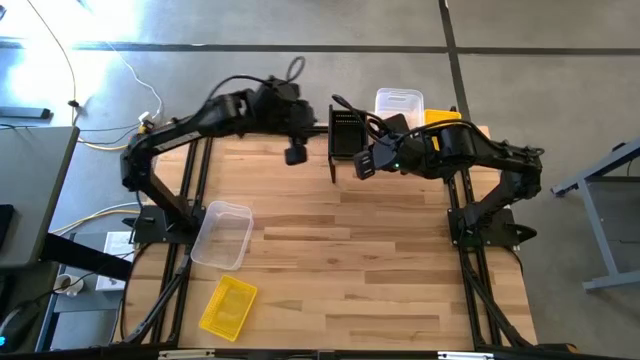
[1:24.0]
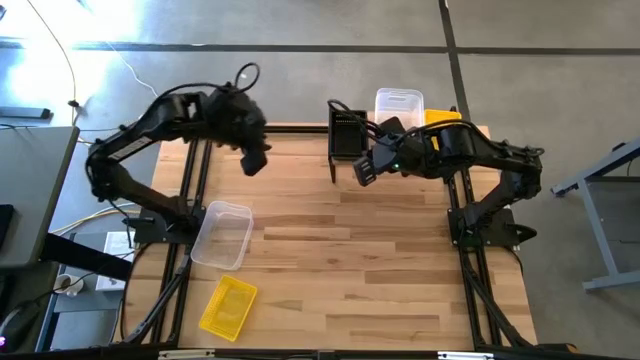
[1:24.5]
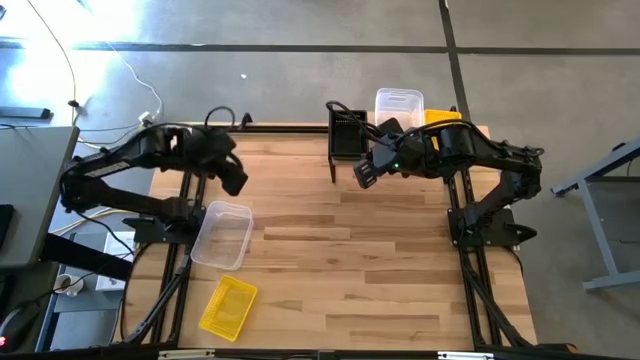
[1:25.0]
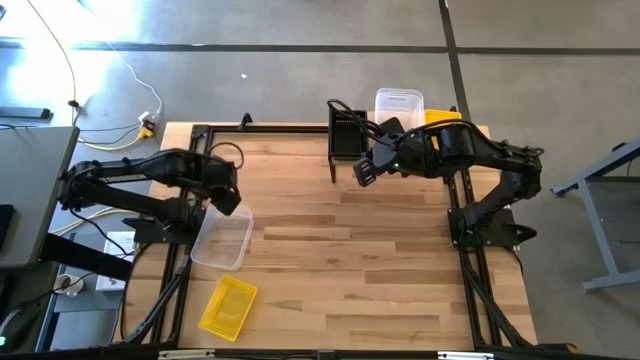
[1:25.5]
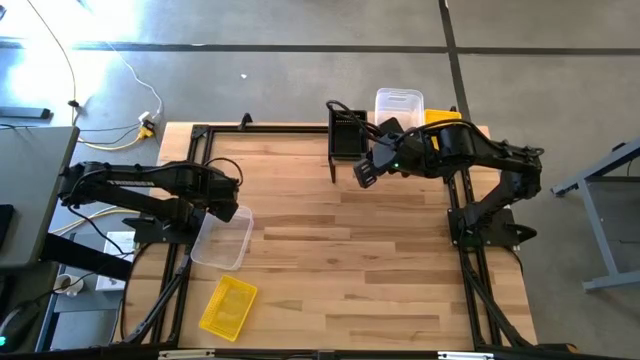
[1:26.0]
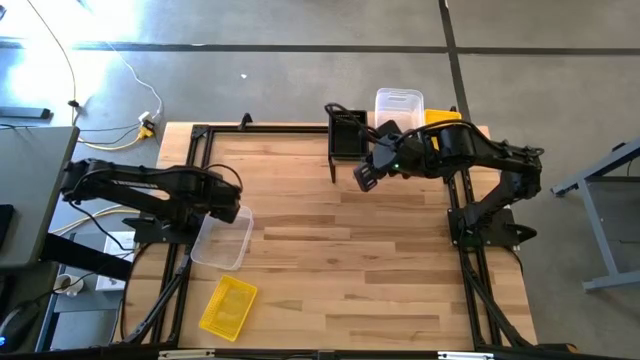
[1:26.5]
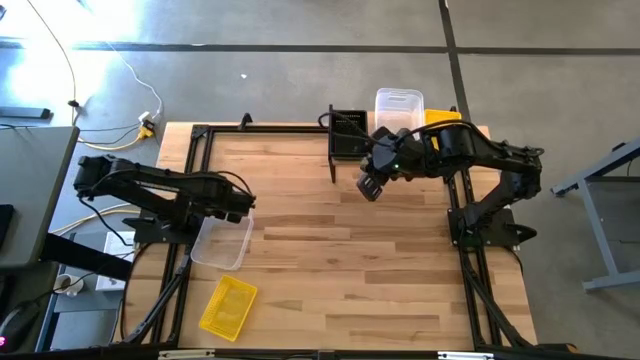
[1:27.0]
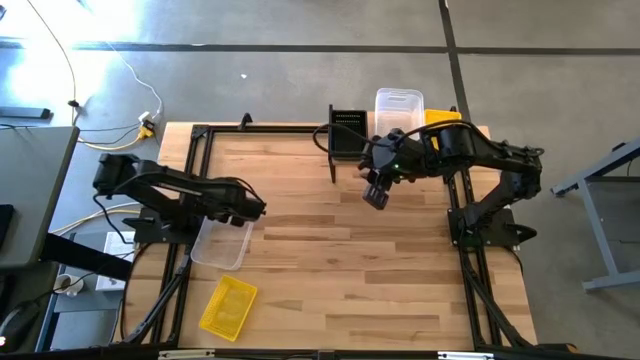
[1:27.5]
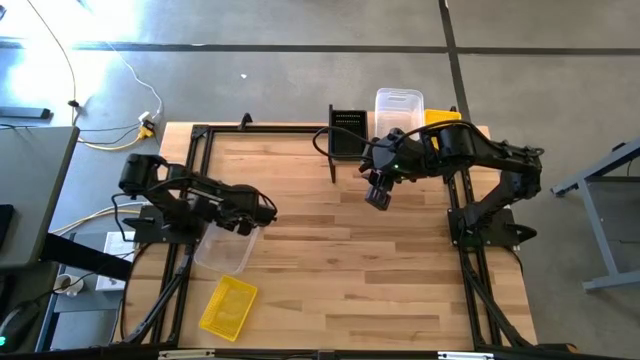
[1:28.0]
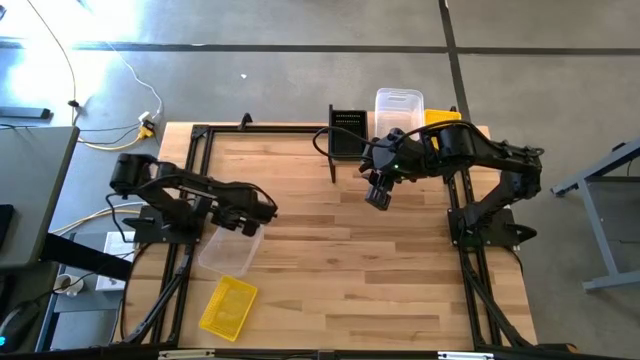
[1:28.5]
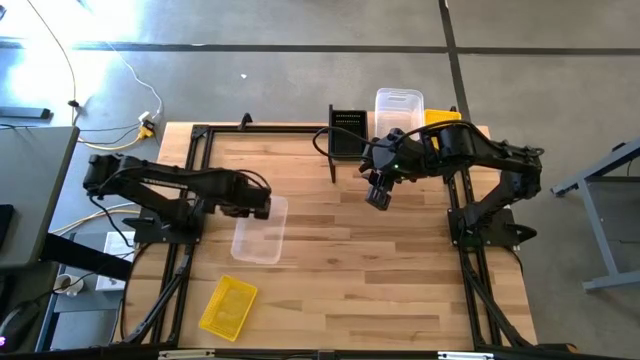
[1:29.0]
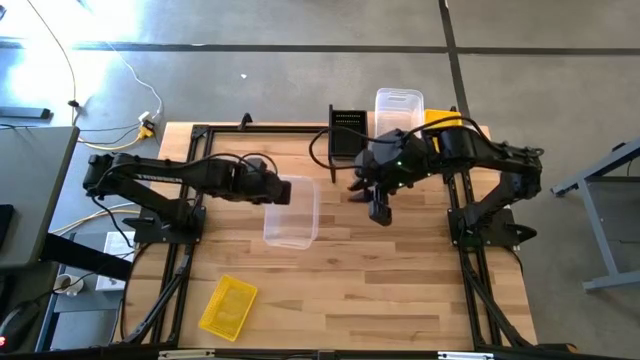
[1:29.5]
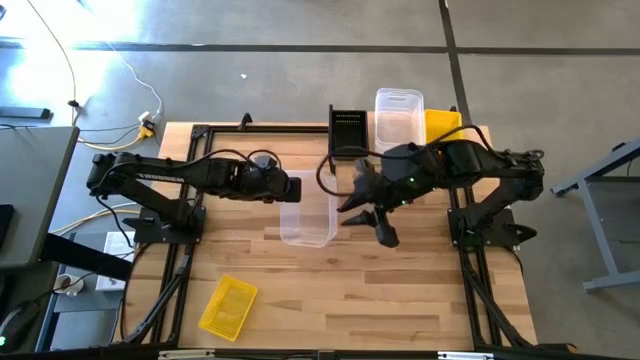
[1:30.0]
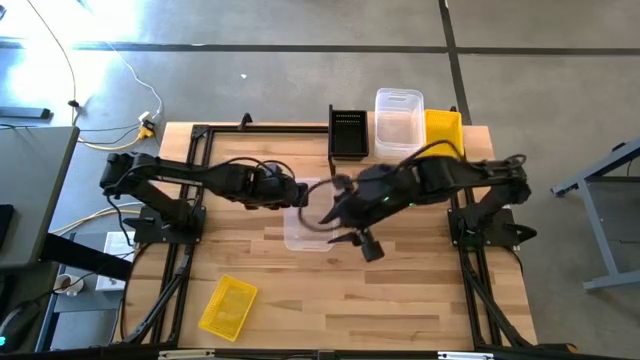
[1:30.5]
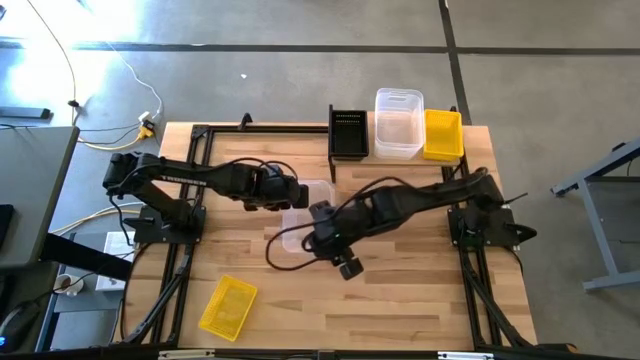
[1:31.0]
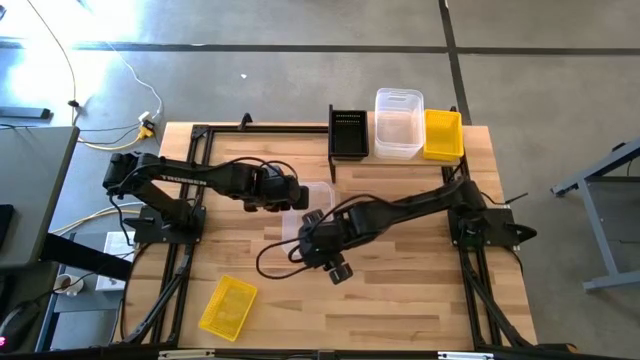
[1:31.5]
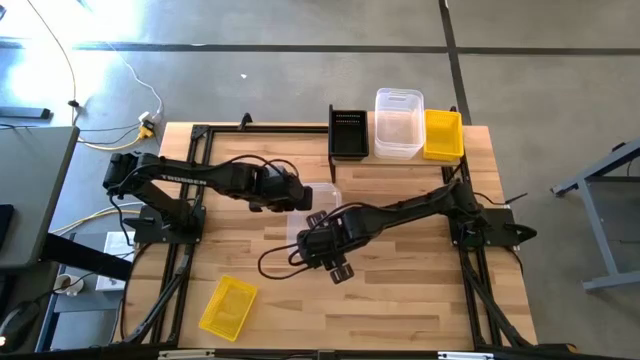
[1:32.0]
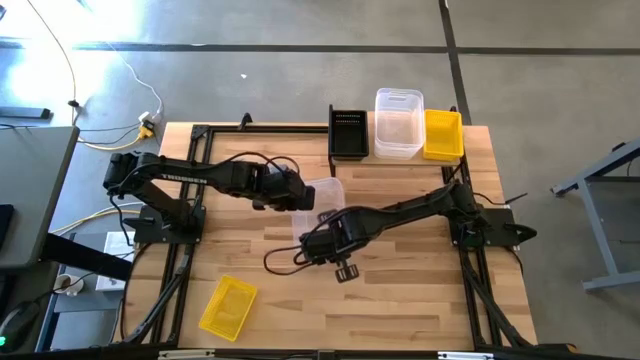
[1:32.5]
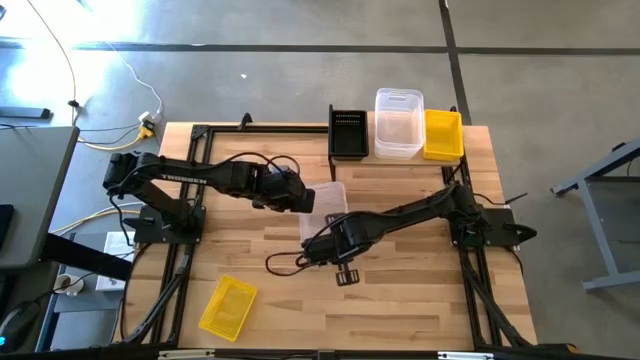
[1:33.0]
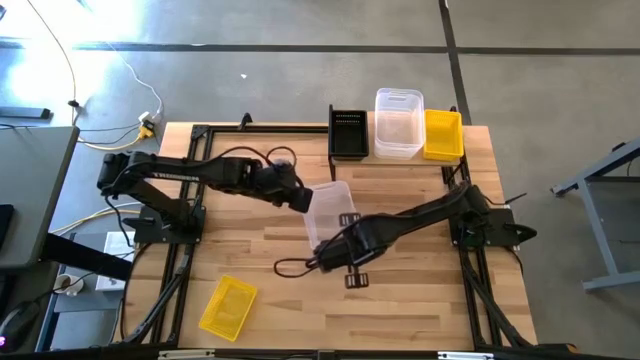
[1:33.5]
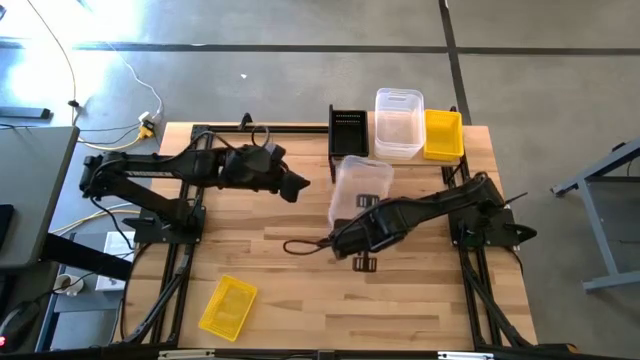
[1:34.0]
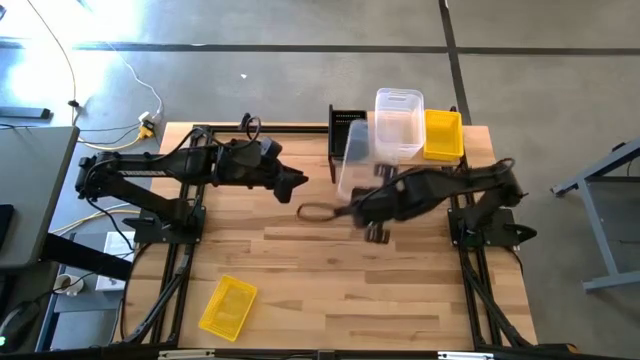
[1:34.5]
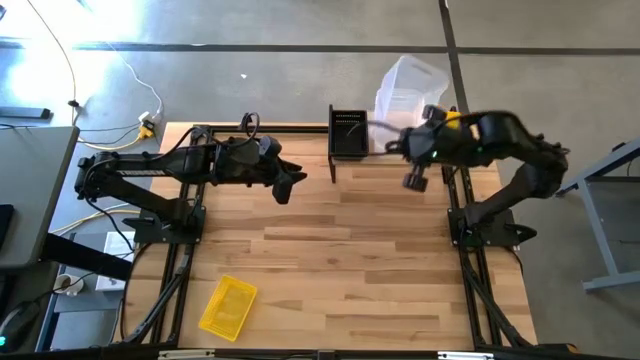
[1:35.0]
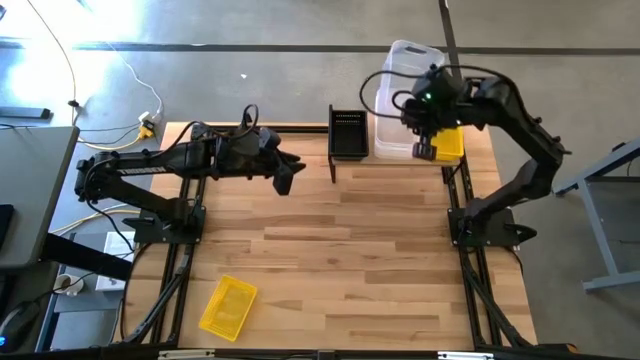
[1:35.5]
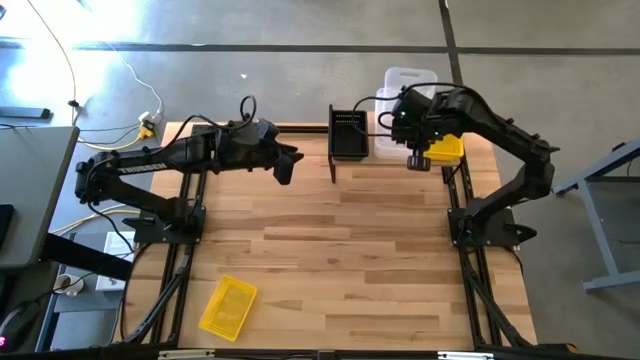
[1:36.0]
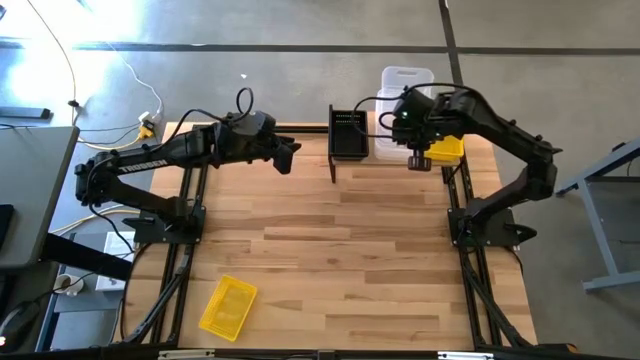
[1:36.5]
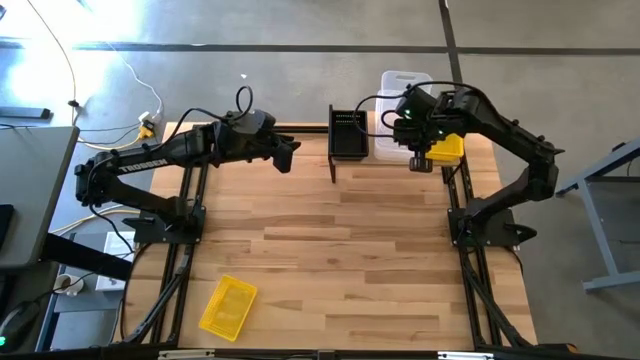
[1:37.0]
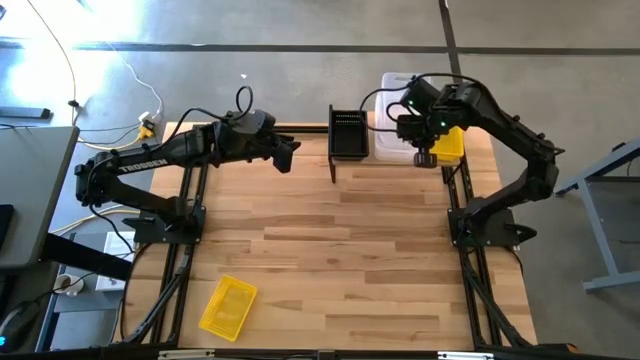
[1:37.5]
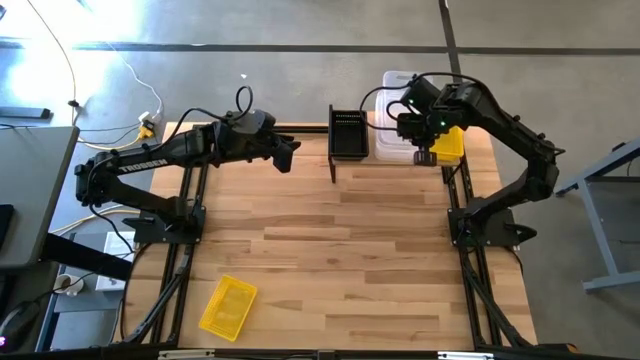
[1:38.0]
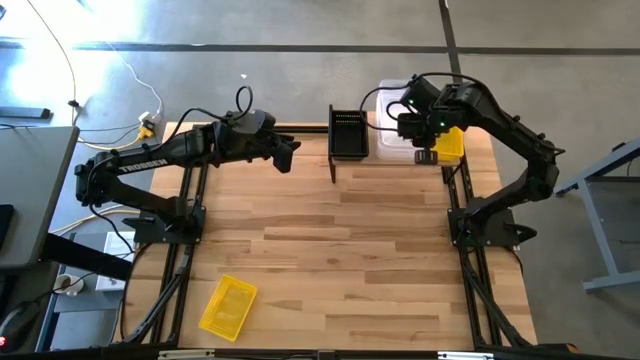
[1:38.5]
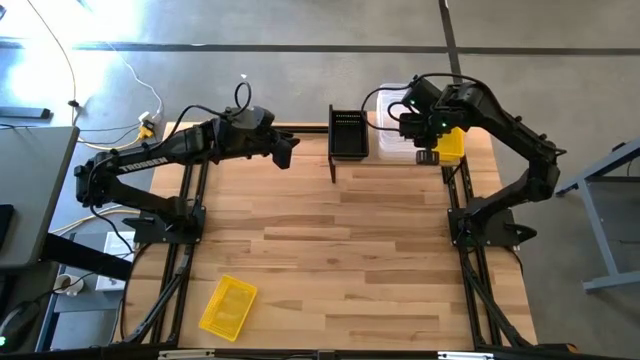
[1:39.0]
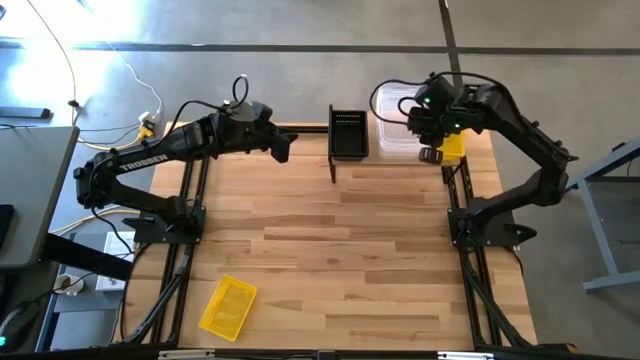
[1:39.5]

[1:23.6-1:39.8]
Task: Stack baskets on shelf by color
Stack the transparent bin on top of the stacked transparent bins on the shelf

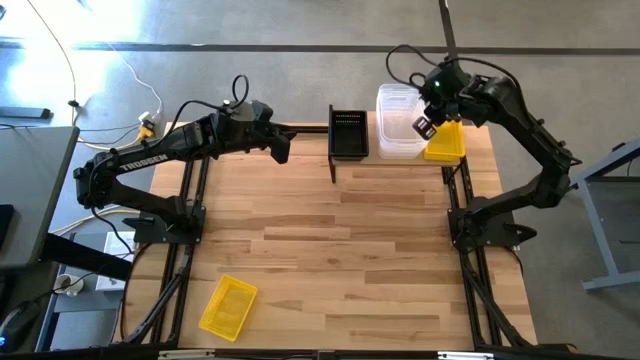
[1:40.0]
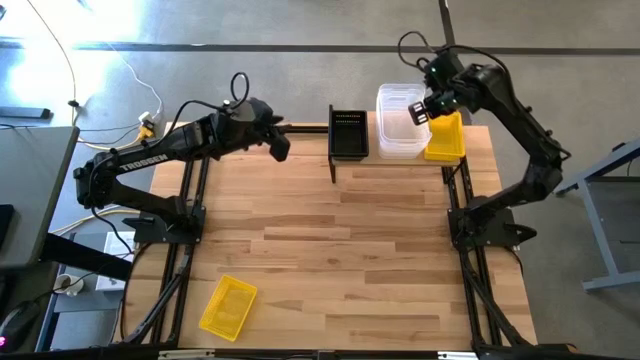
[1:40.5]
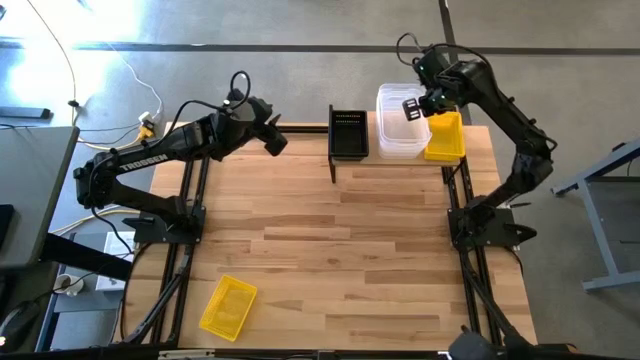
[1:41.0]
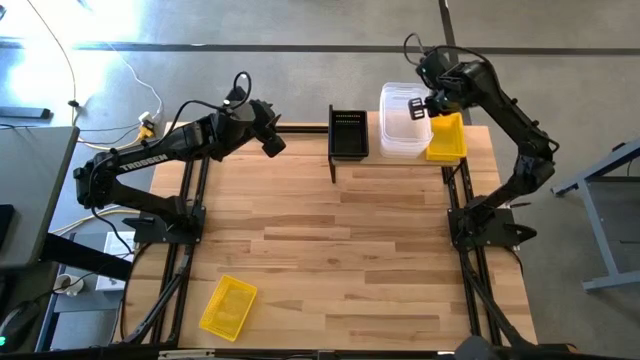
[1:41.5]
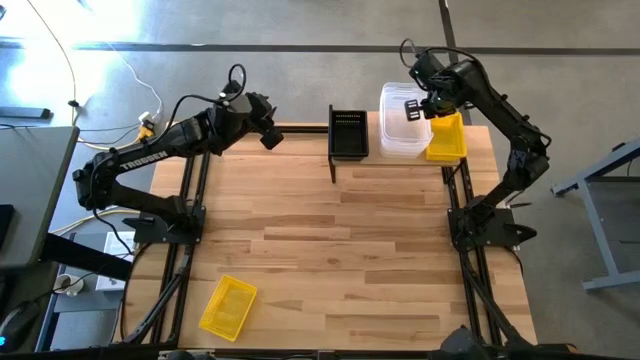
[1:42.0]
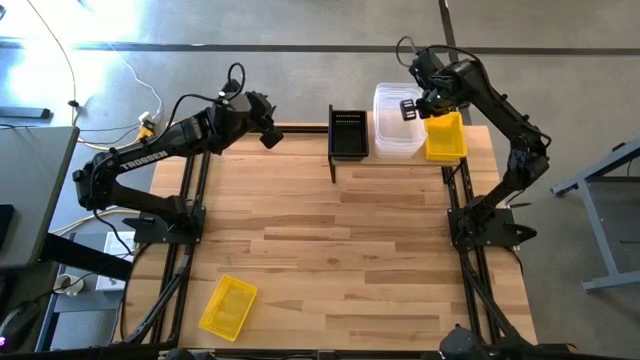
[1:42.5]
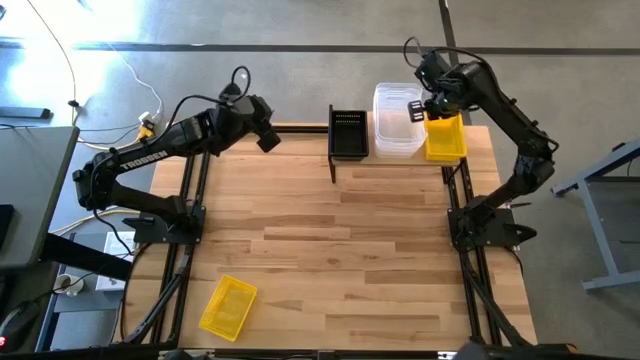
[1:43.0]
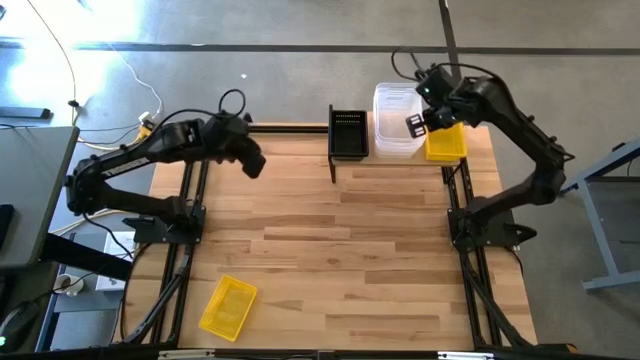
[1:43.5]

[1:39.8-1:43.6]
Adjust the stacked transparent bins

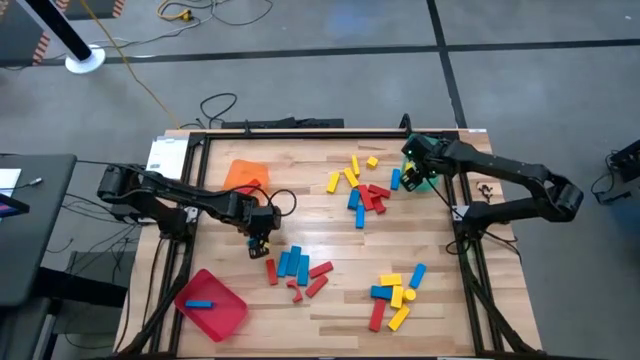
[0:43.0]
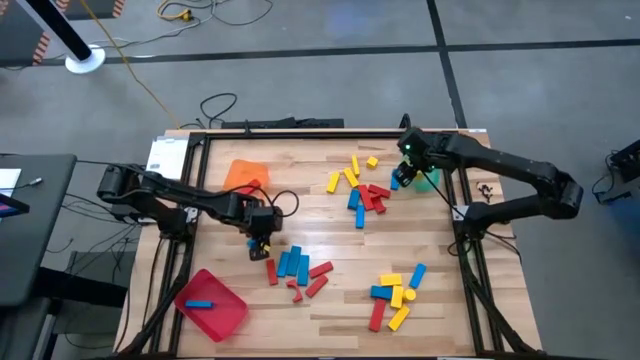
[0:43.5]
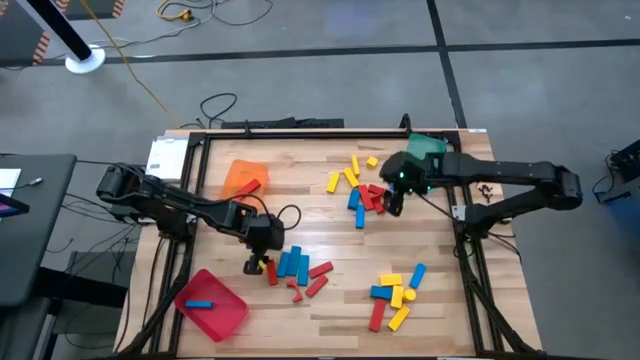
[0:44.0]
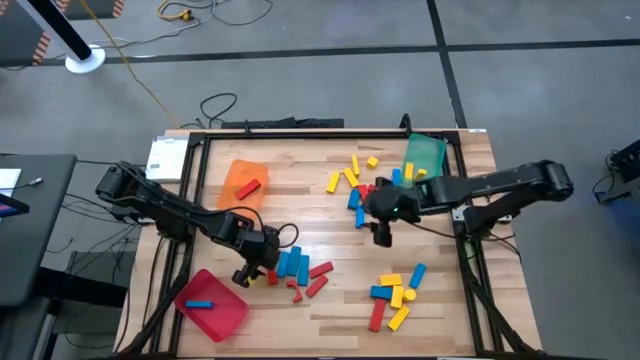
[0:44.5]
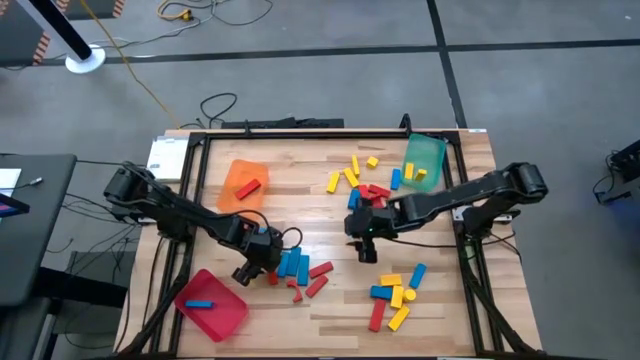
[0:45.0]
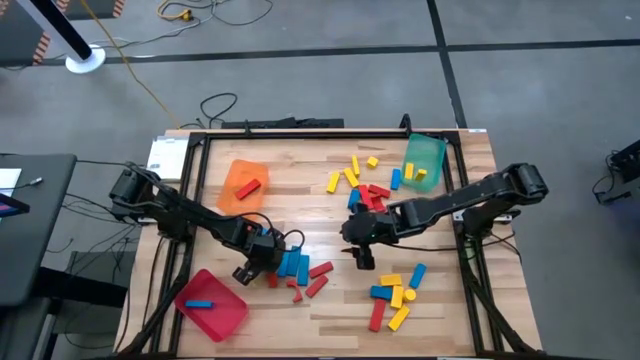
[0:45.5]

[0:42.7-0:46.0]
Task: Sort blocks
Put the red wooden block into the orange bin
